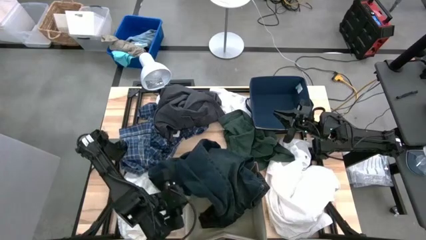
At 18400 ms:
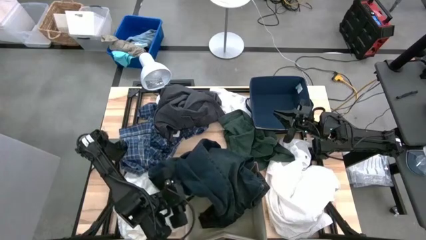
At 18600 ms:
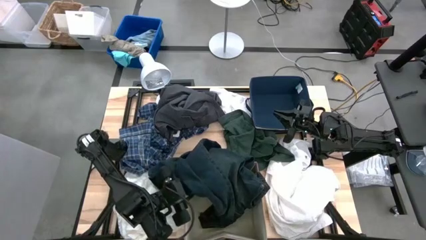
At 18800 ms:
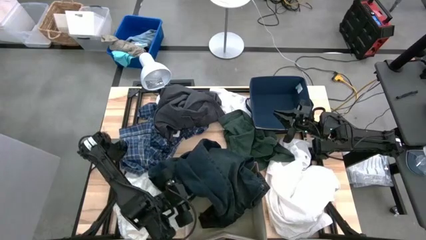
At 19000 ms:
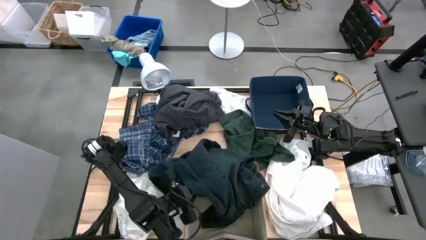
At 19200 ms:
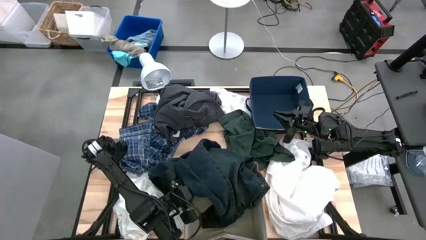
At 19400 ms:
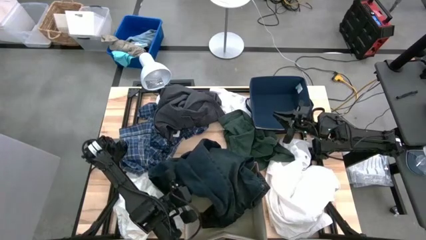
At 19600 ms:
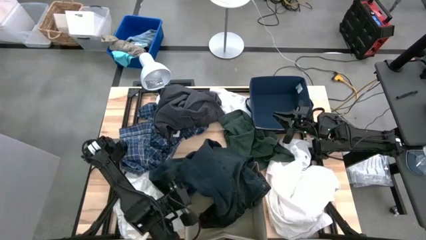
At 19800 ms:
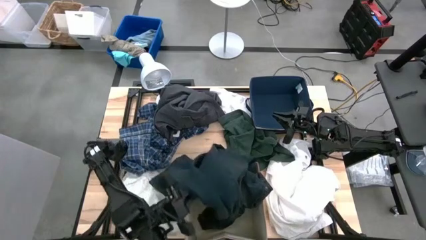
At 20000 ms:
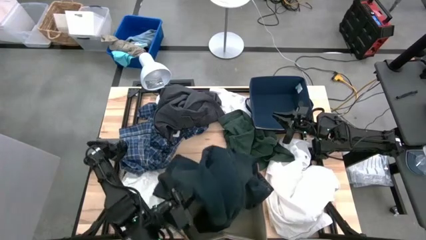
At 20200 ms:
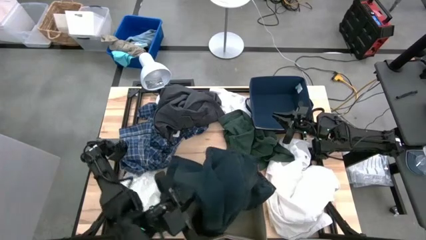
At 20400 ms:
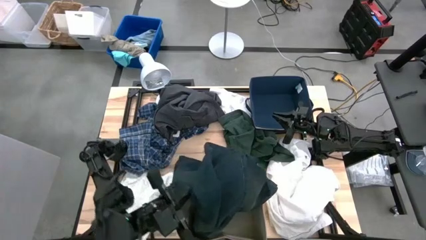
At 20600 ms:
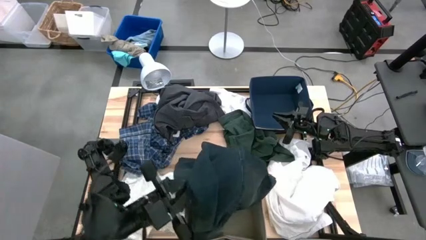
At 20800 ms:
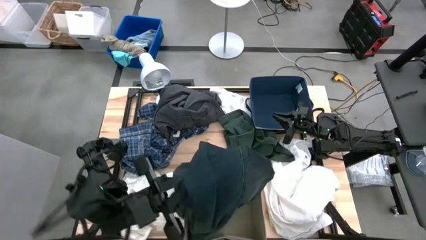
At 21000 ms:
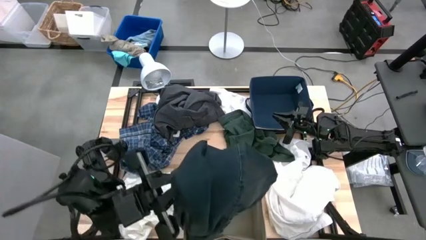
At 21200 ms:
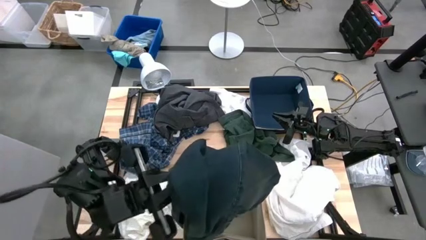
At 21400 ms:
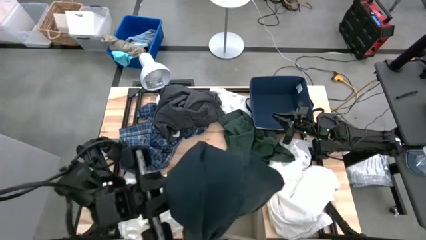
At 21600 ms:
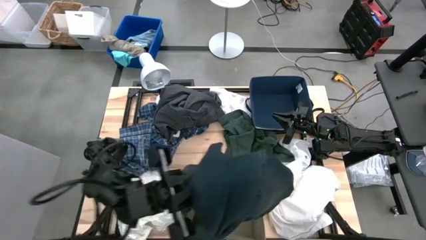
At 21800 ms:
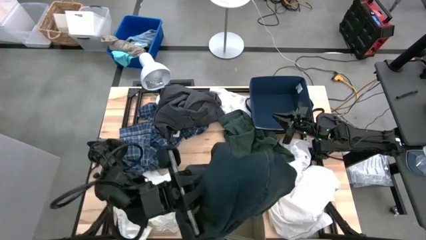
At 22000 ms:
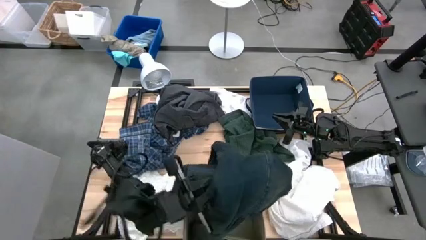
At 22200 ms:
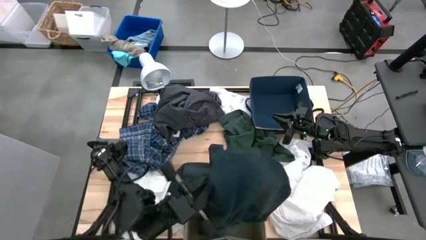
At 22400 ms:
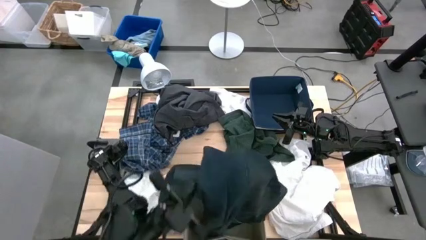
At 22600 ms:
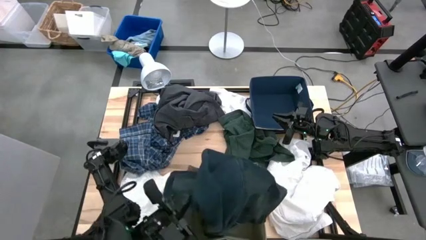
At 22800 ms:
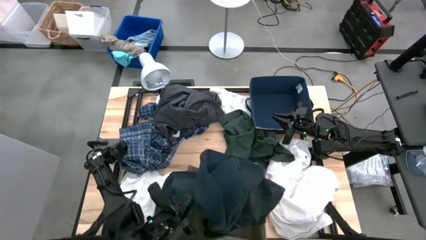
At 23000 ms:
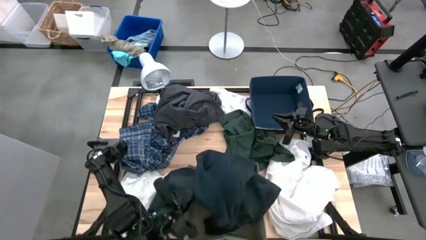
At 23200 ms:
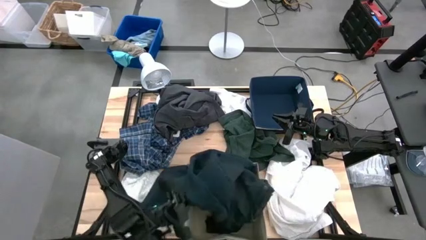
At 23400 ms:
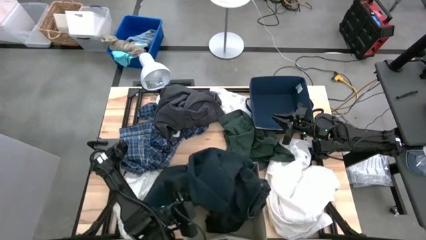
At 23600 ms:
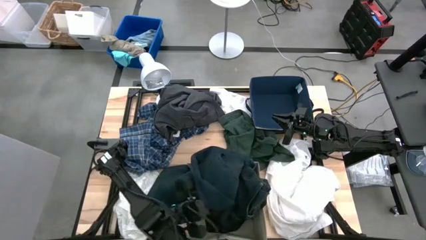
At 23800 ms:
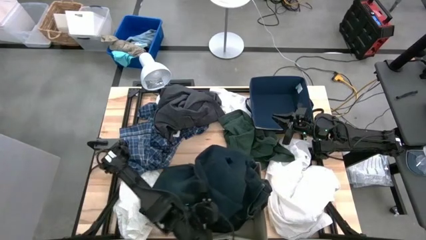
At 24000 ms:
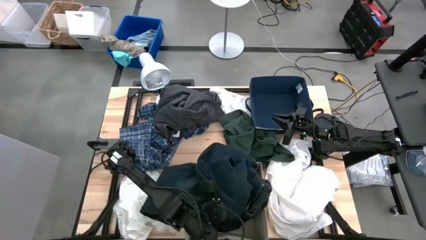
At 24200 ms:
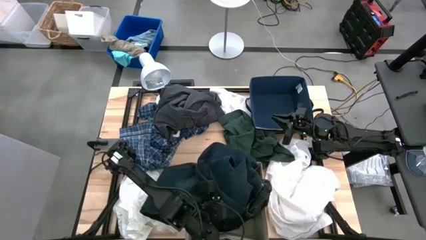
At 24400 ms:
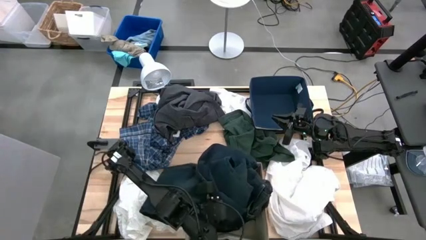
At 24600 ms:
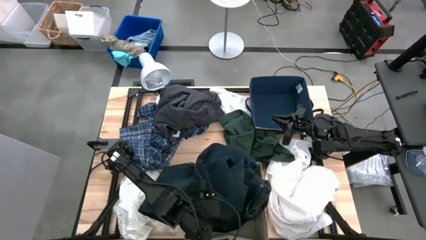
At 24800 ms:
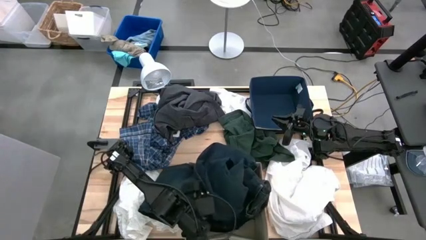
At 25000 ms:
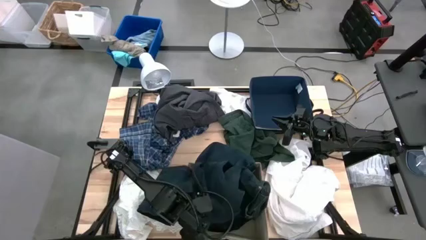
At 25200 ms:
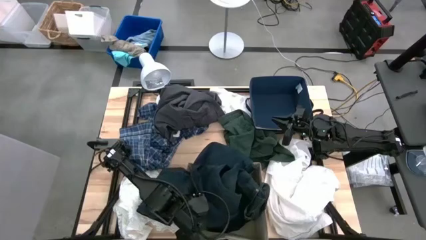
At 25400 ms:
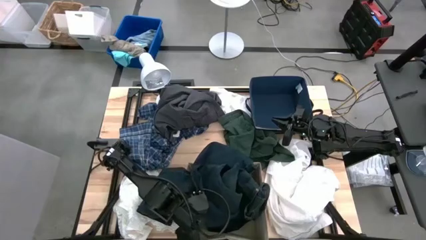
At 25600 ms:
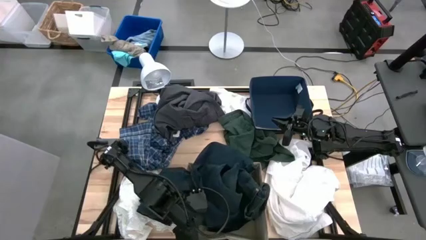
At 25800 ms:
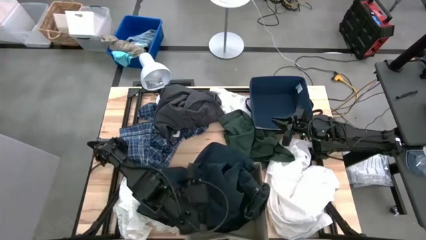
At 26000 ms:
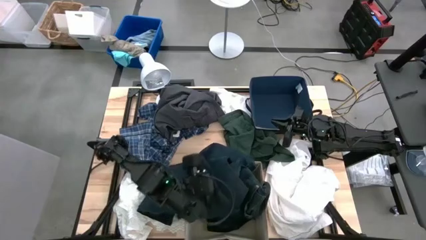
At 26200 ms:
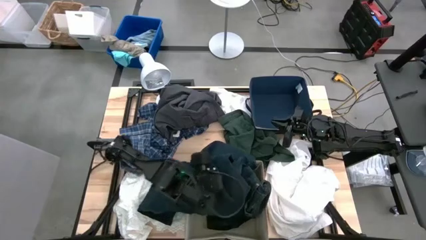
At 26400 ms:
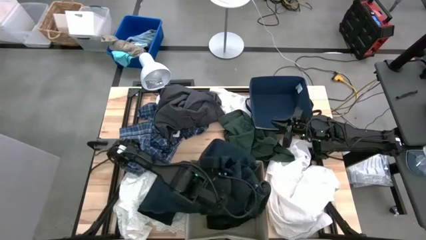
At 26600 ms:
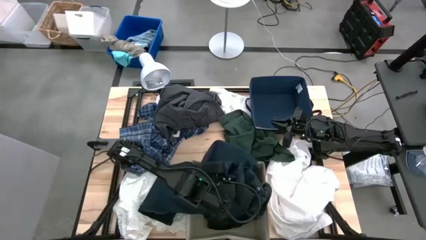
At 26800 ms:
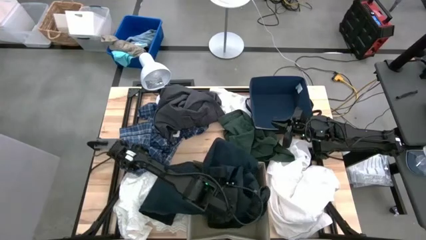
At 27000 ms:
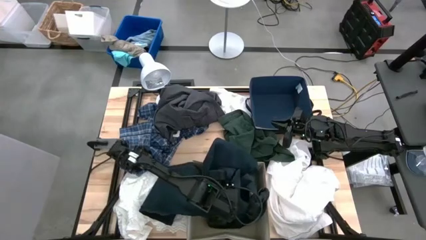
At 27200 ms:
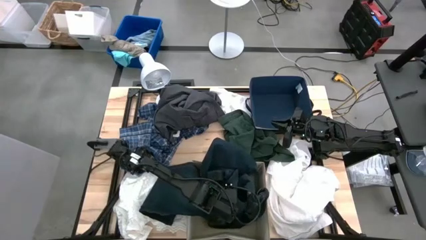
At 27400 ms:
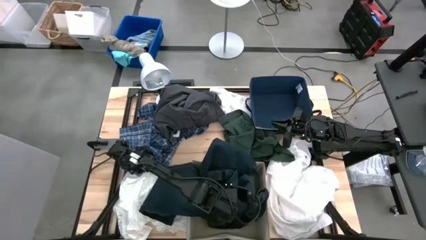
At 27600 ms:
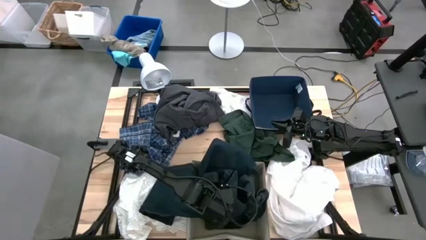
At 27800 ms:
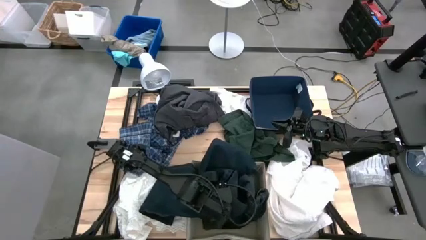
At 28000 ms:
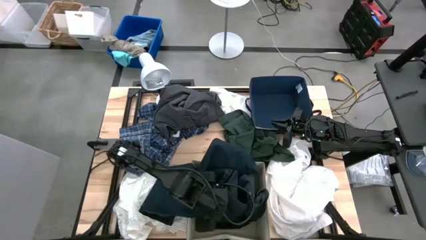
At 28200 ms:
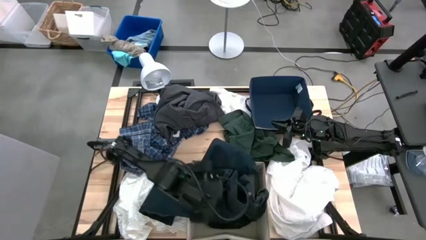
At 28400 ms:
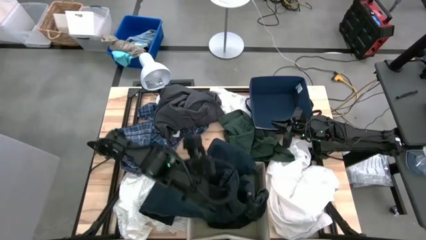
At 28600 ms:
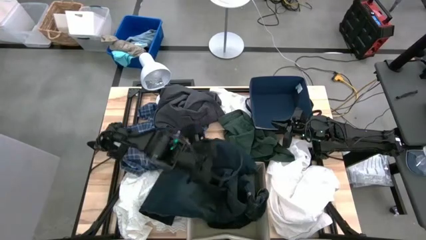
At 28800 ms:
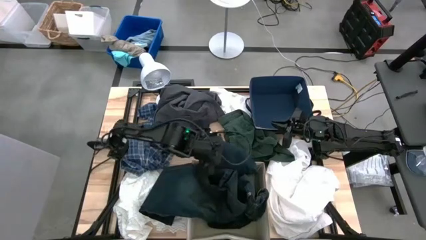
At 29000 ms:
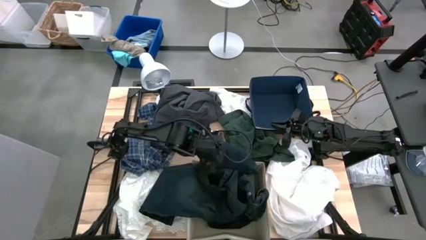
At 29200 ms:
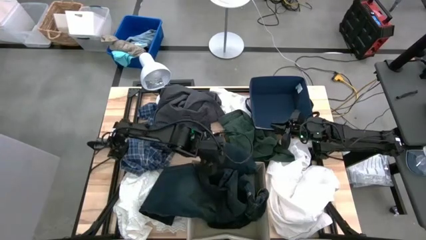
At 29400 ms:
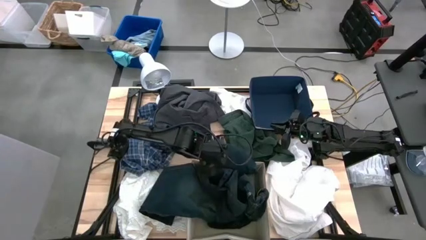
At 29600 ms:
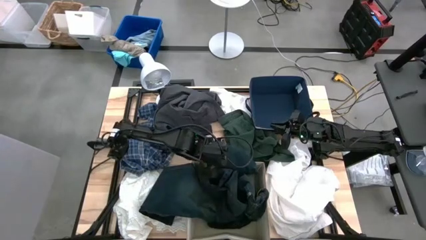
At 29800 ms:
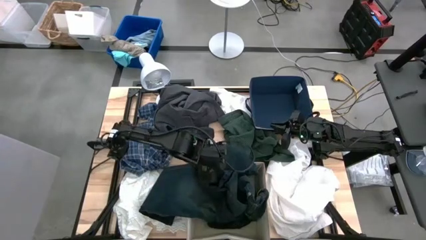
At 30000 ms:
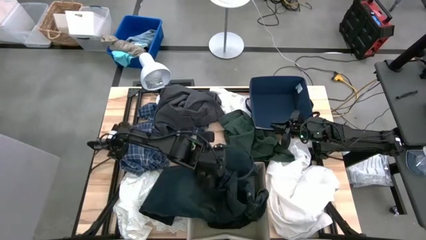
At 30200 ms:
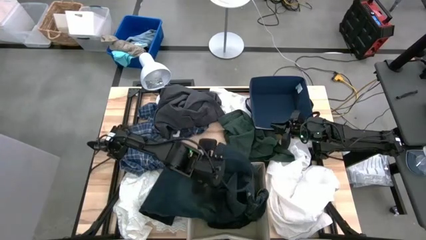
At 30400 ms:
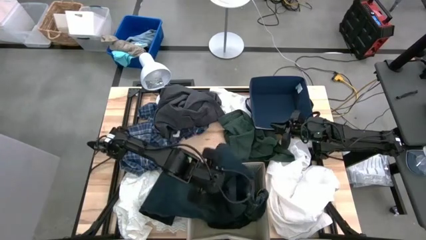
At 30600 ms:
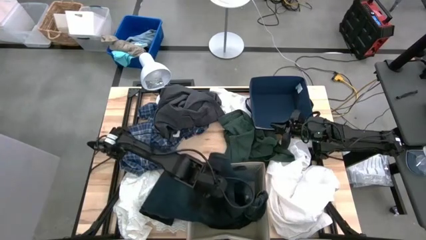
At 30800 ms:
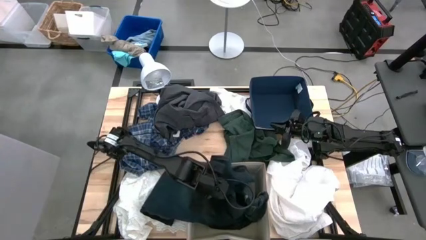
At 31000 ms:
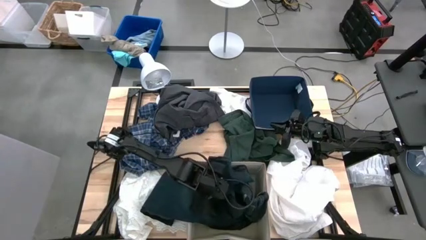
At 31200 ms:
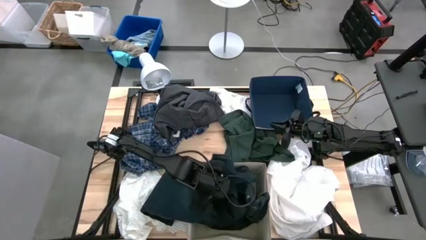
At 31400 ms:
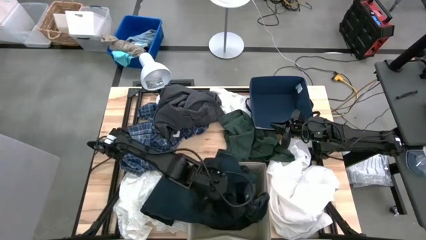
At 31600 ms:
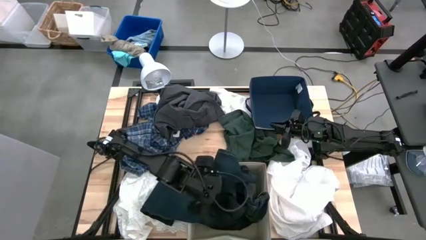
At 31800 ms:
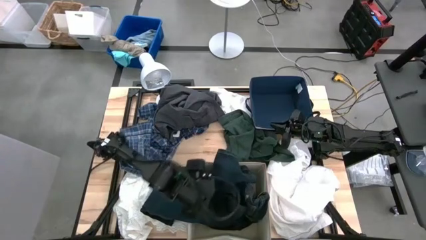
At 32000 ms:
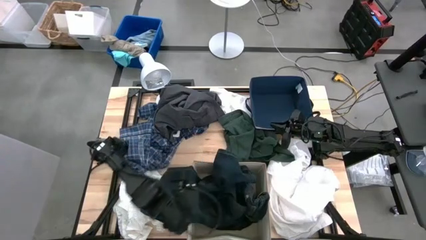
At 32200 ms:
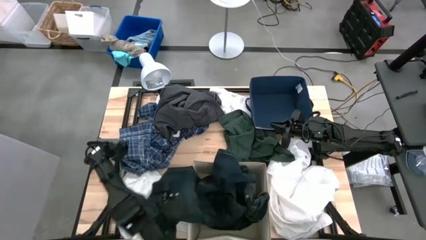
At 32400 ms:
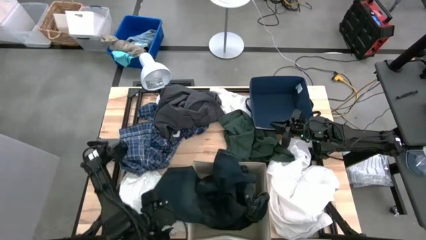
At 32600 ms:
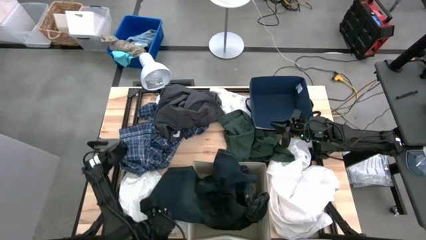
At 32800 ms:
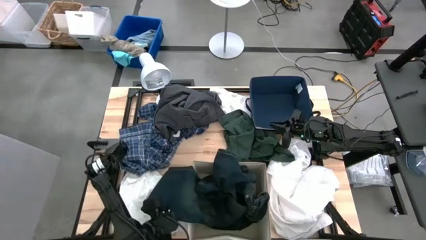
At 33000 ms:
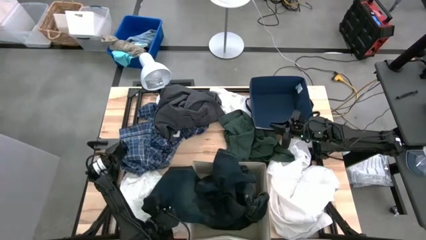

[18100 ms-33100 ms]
Task: Sort clothes
Put the dark blue pants into the brown laundry organizer
